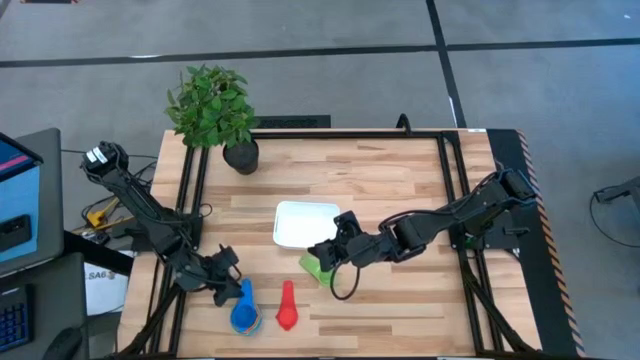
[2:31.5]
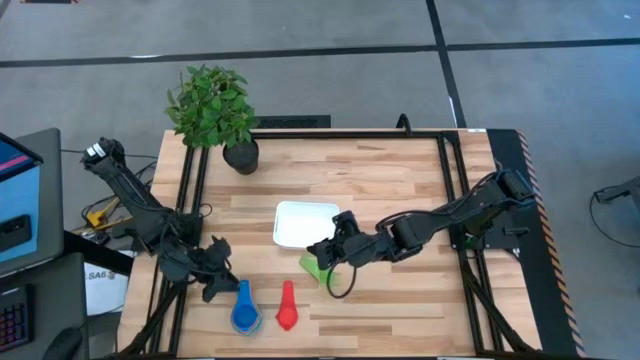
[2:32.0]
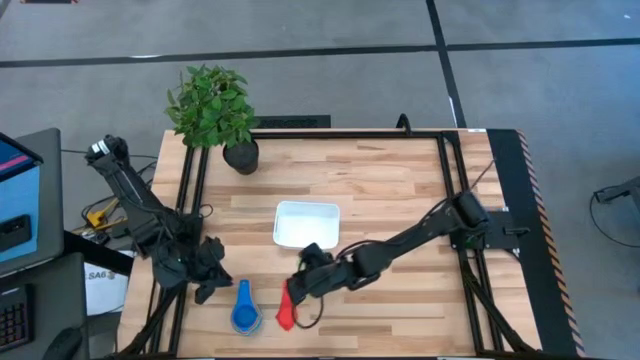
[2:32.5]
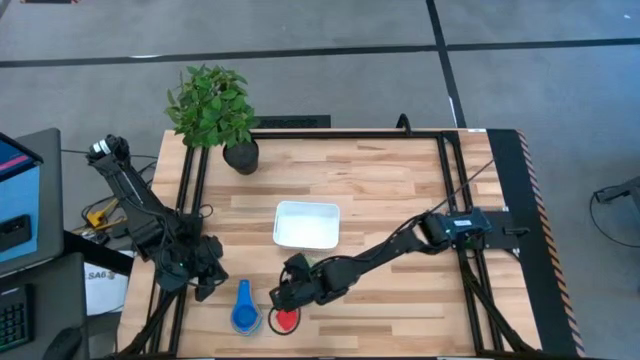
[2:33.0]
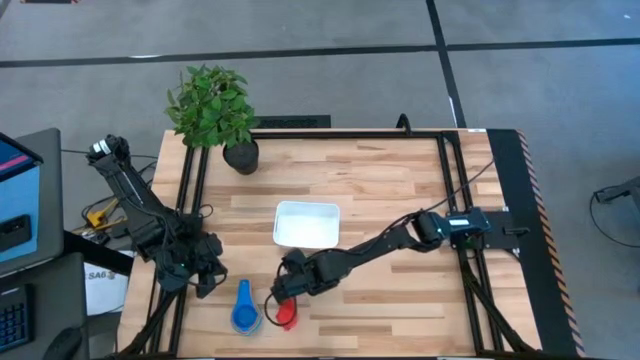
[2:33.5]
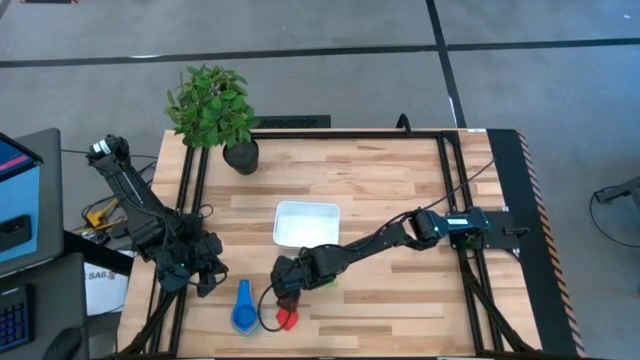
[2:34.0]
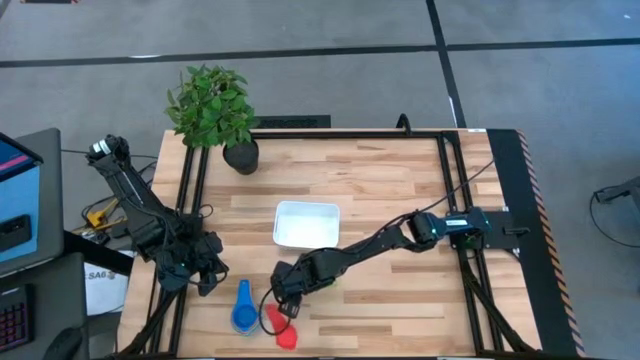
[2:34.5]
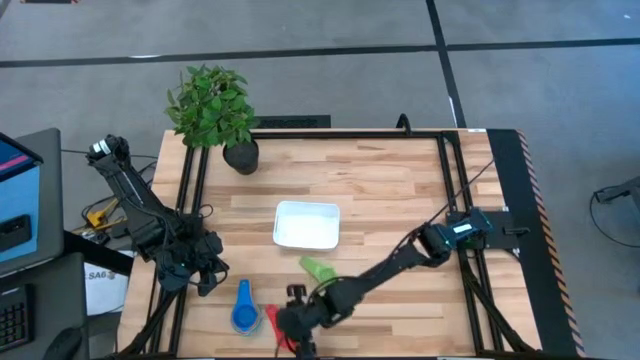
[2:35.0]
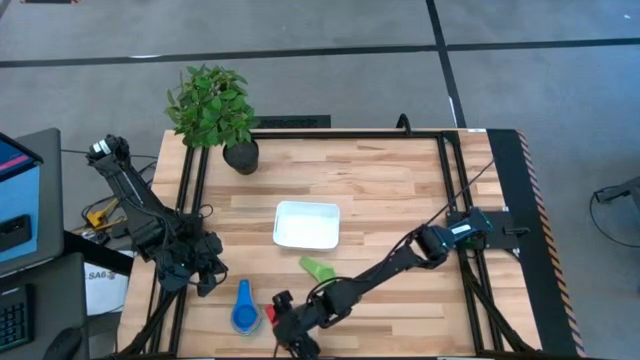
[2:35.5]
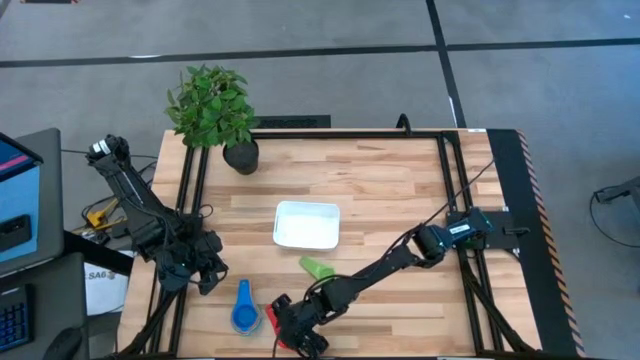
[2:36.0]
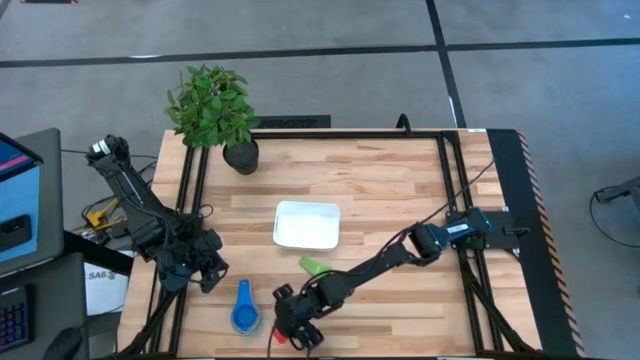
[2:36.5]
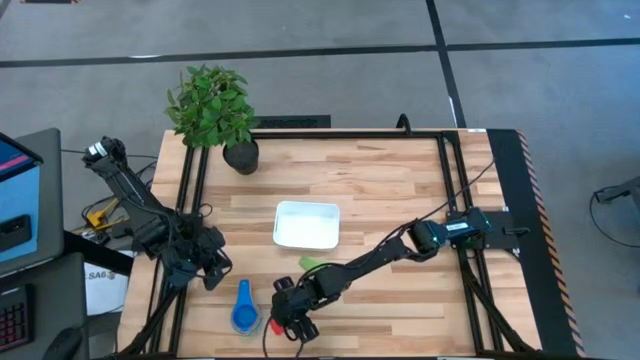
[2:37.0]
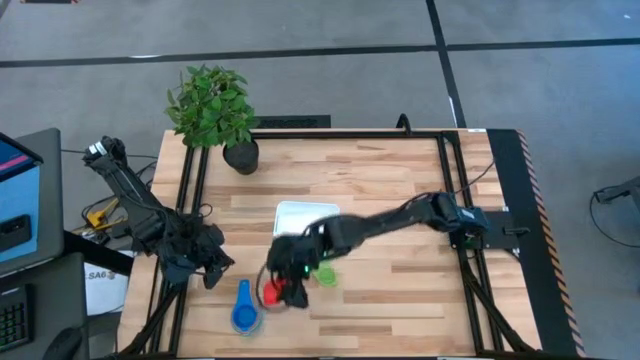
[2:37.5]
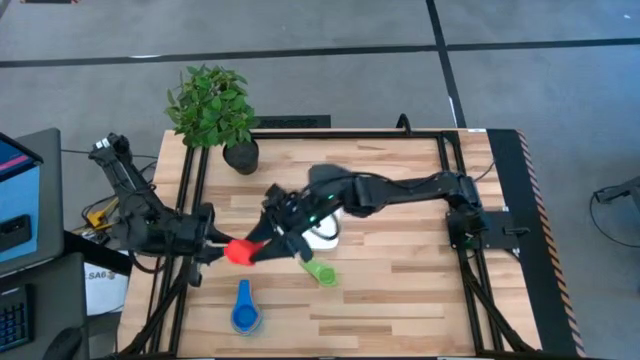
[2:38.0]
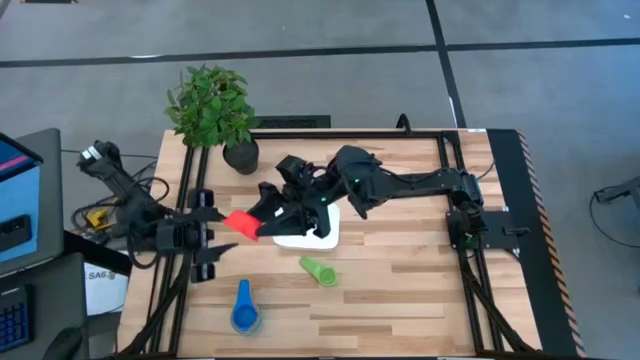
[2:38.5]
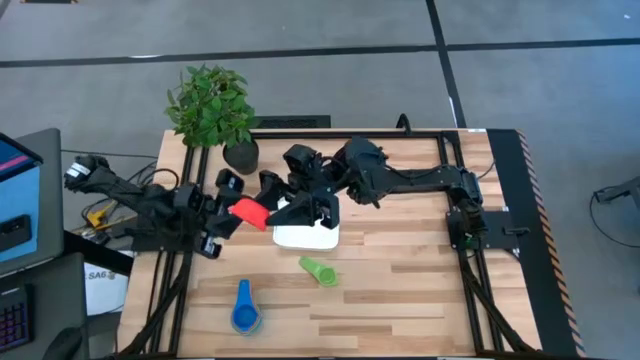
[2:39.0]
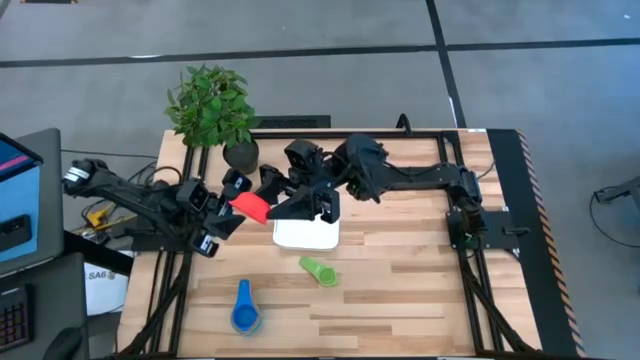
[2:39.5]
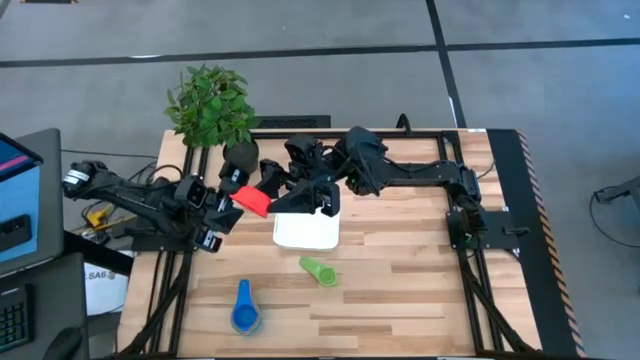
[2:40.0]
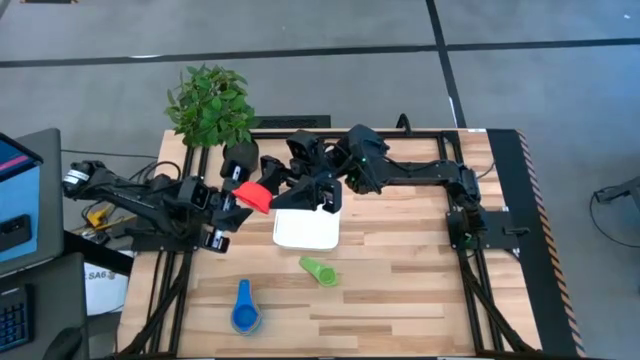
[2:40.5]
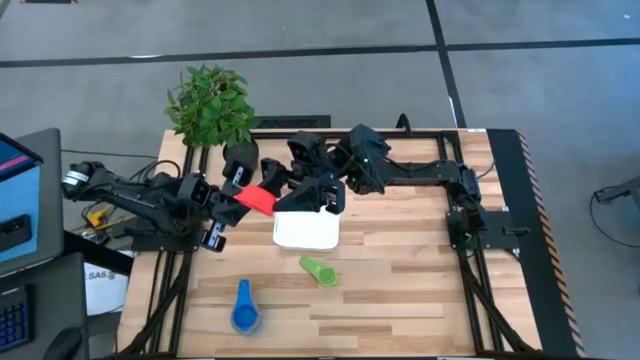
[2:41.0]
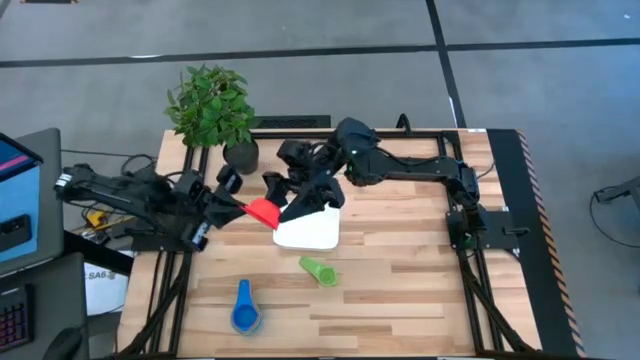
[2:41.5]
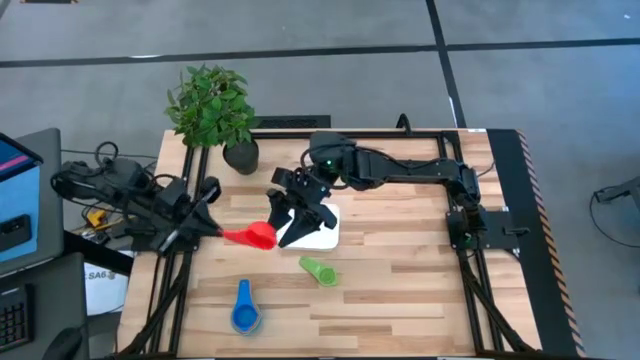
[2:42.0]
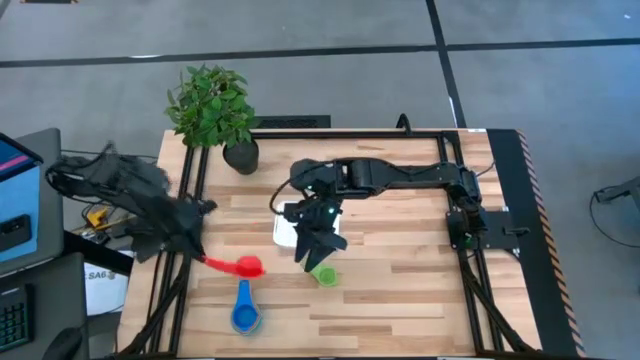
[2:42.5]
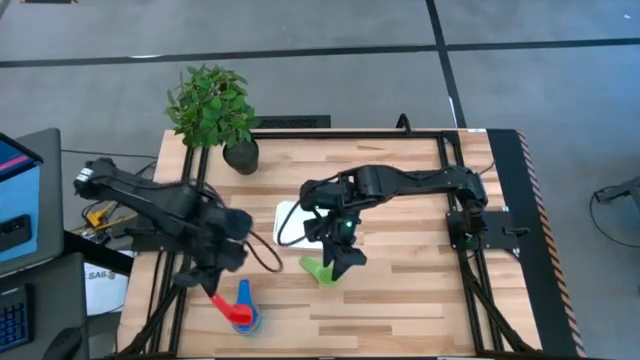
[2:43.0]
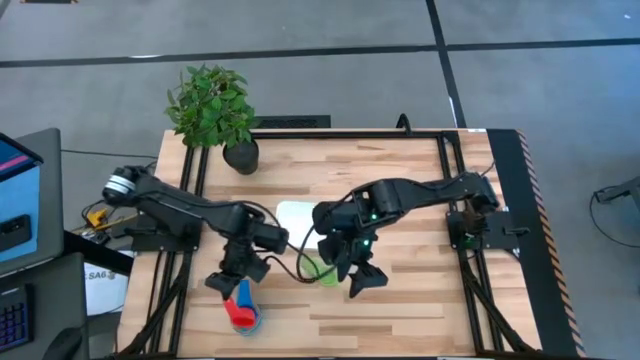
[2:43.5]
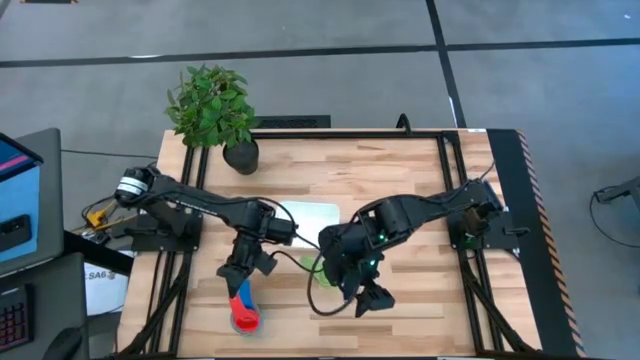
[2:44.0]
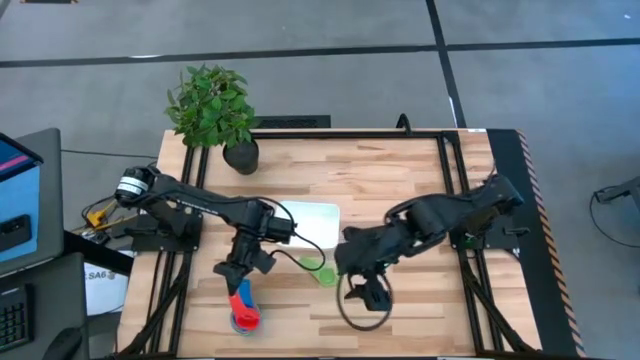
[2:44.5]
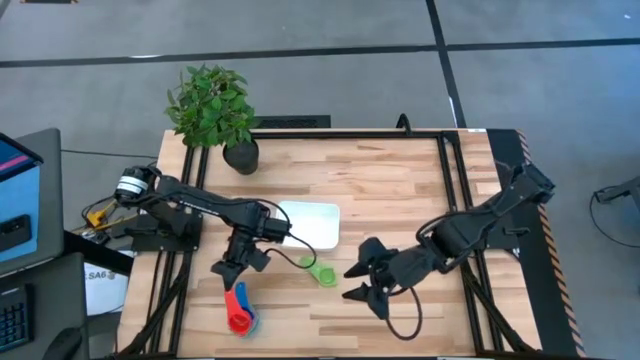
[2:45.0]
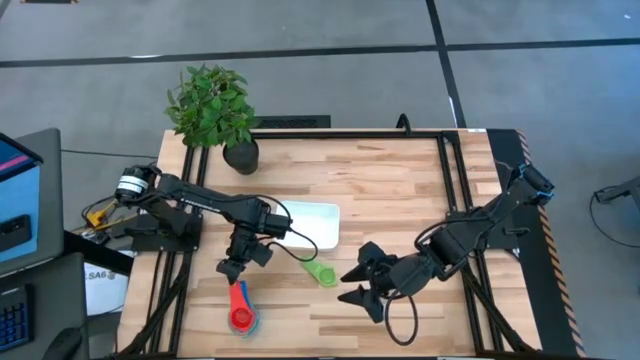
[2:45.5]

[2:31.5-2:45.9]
Task: Nest measuring cups in basket
Stack the red measuring cup into the light blue measuring cup

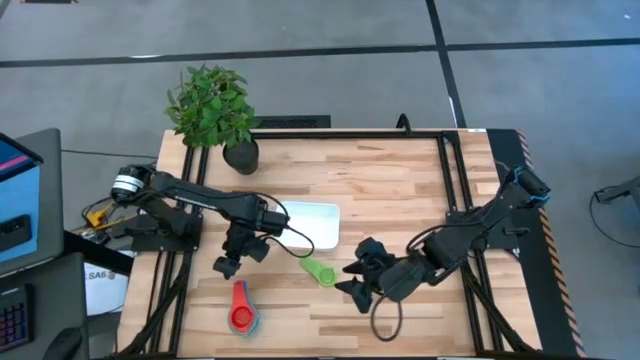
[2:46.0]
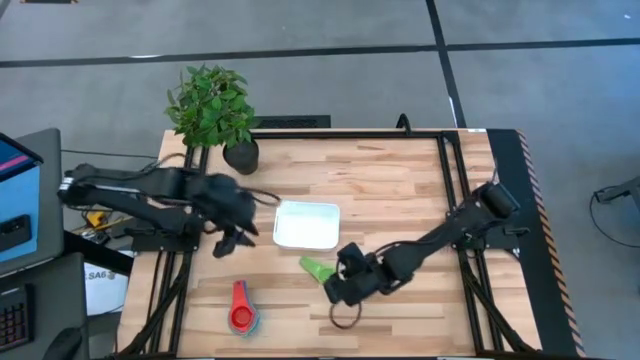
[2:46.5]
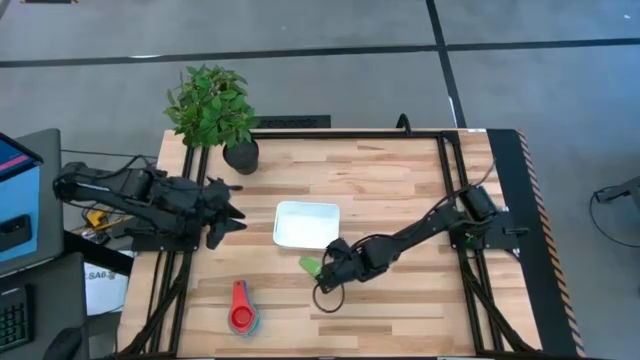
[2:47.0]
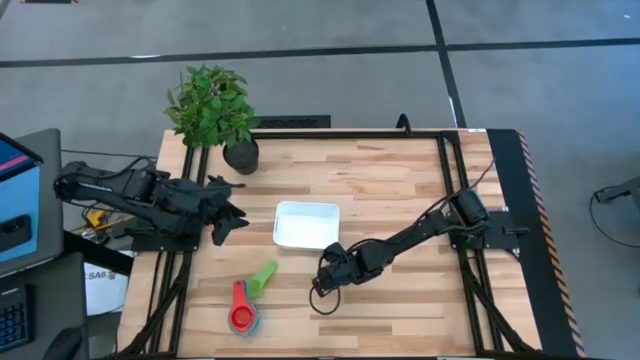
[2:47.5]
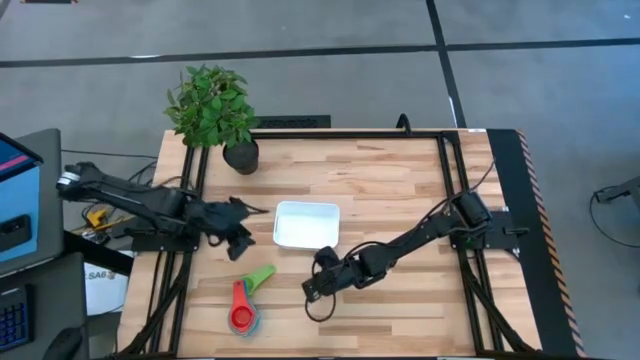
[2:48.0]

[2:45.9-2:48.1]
Stack the green measuring cup into the red measuring cup

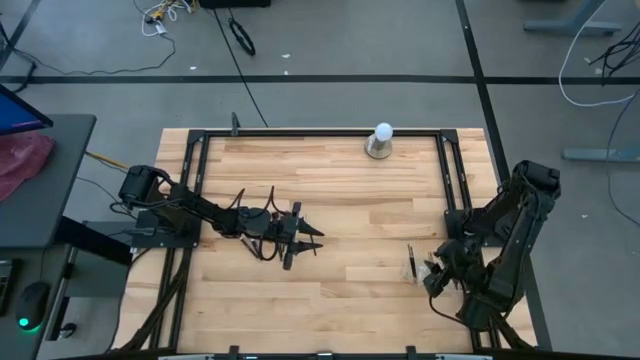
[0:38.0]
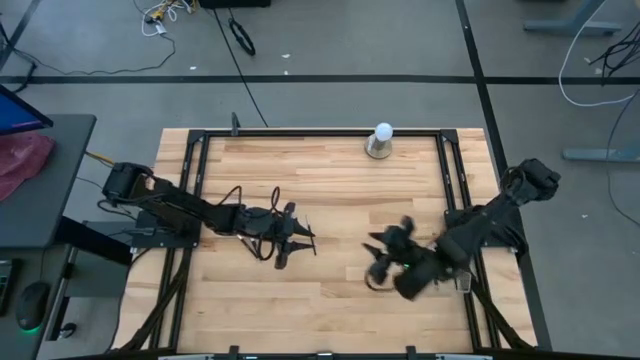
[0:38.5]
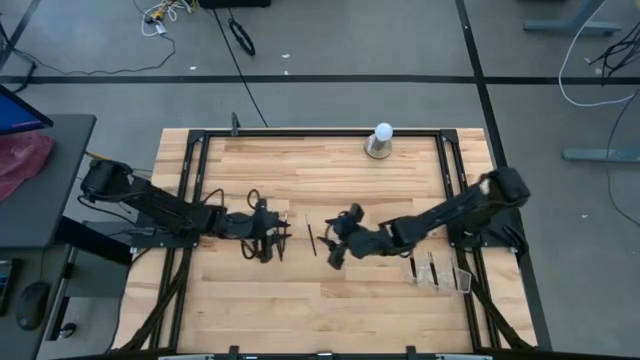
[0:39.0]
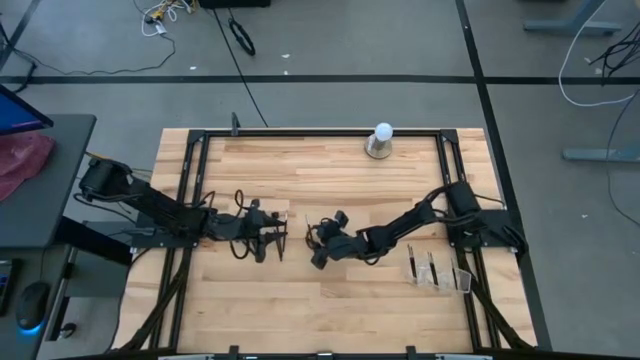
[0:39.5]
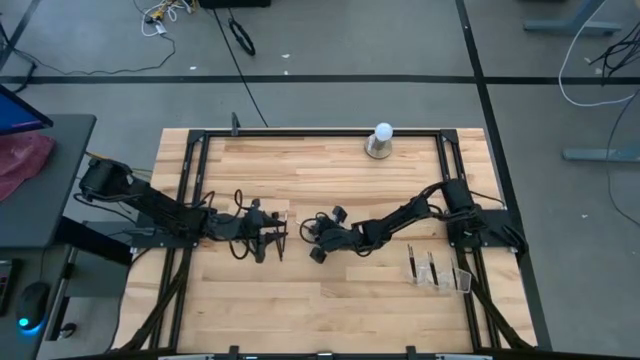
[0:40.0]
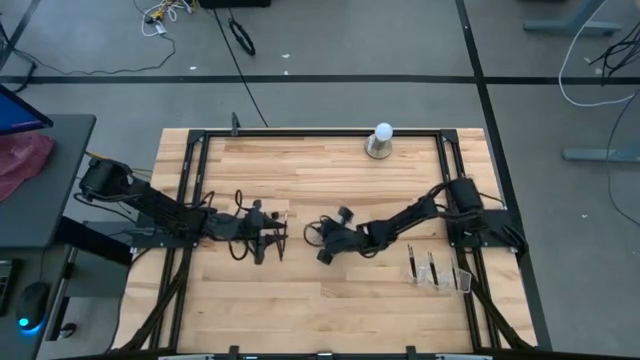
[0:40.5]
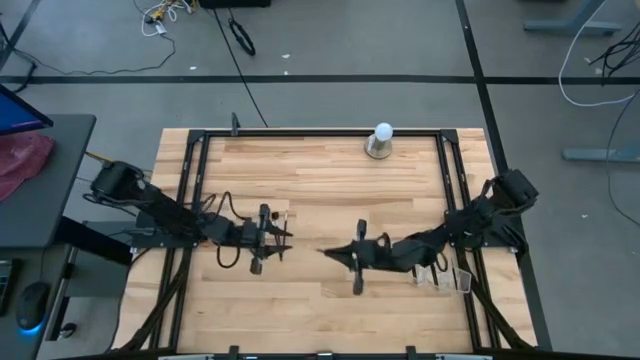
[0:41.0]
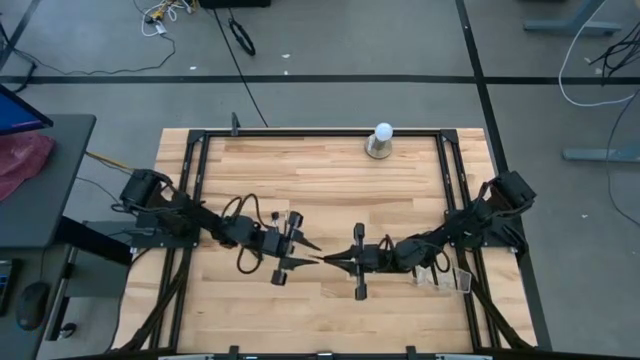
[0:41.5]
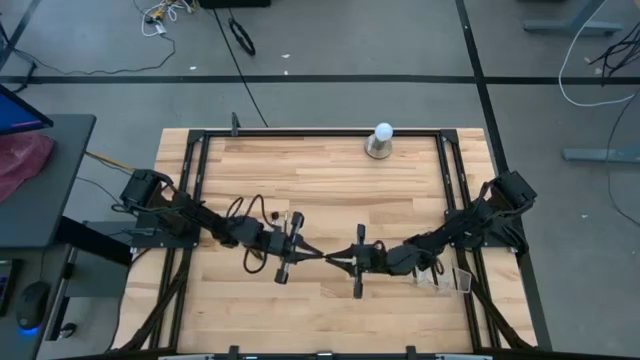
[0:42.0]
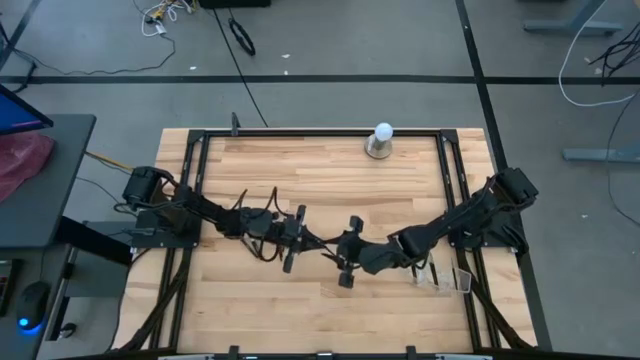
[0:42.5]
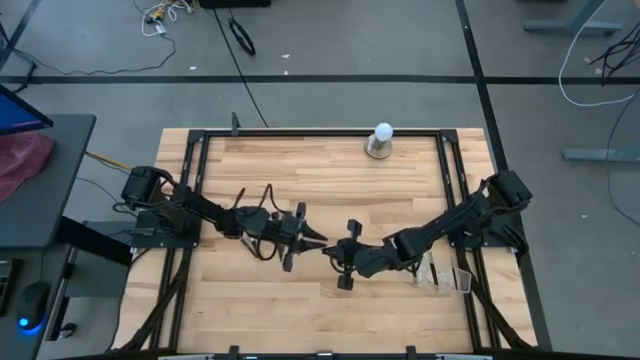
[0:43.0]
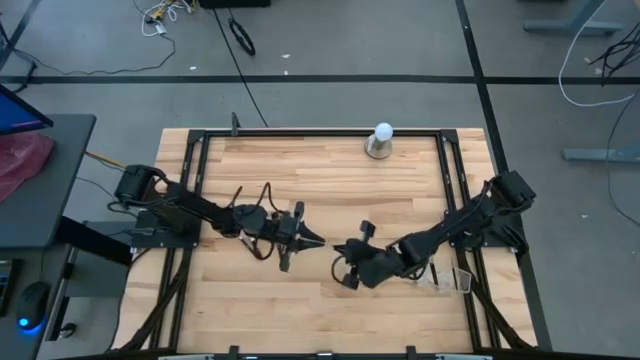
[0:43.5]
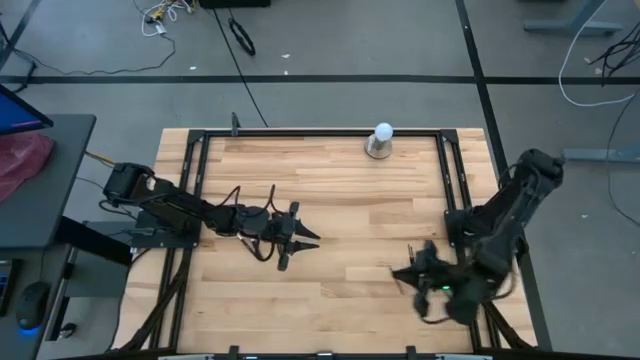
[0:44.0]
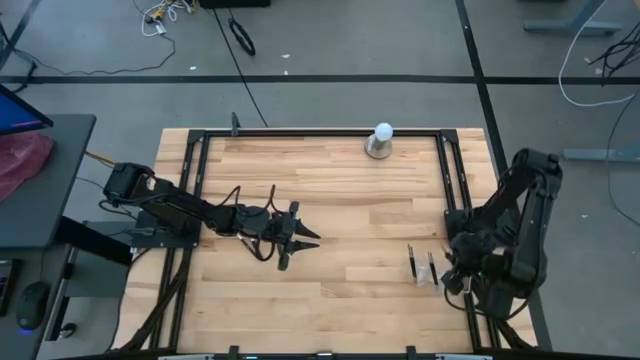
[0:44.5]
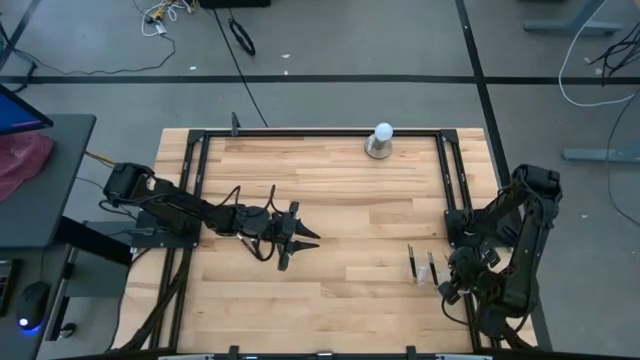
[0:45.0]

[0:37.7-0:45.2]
Task: Put items in baskets/containers
Put the black liner brush into the transparent organizer
